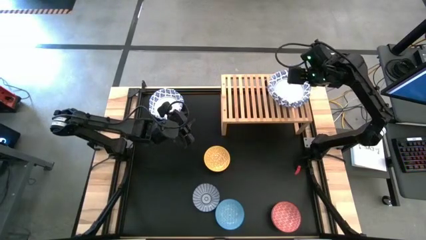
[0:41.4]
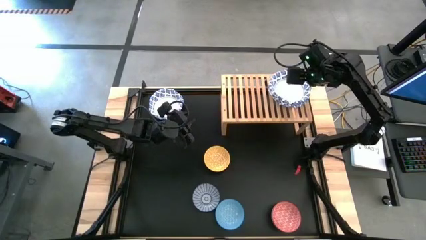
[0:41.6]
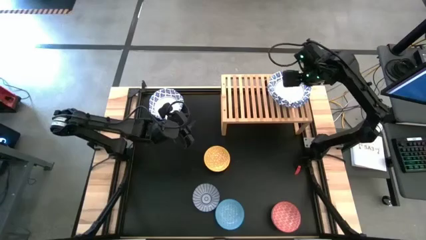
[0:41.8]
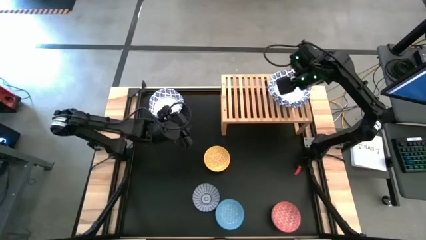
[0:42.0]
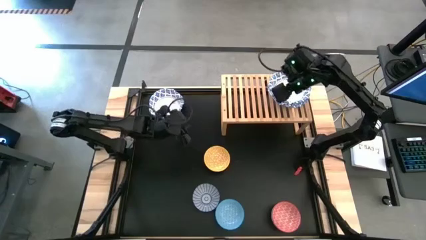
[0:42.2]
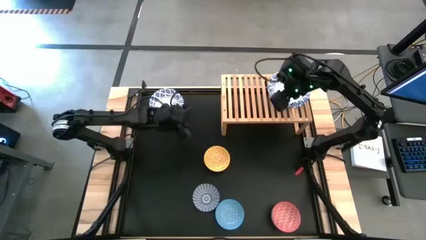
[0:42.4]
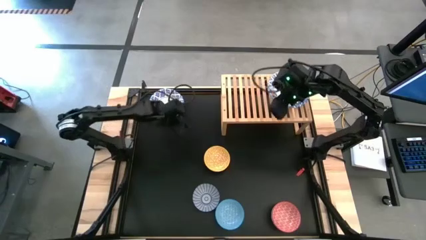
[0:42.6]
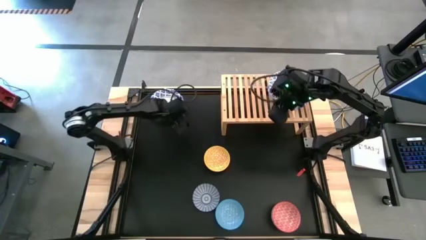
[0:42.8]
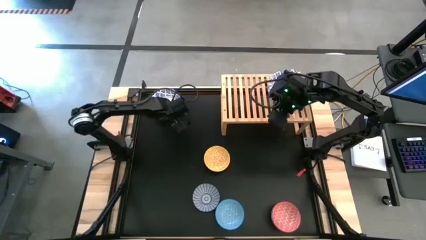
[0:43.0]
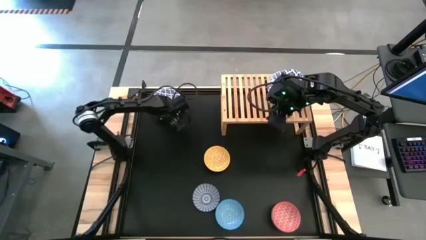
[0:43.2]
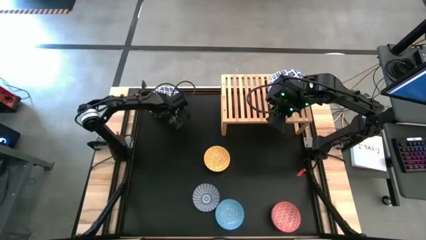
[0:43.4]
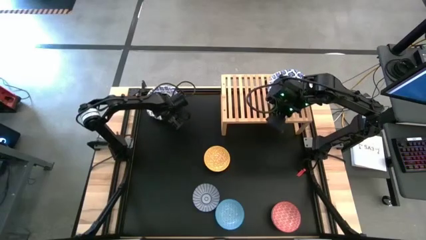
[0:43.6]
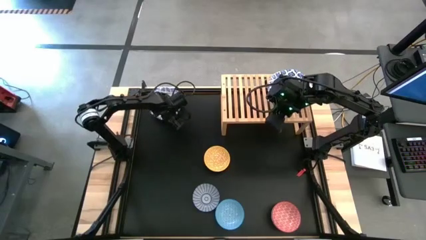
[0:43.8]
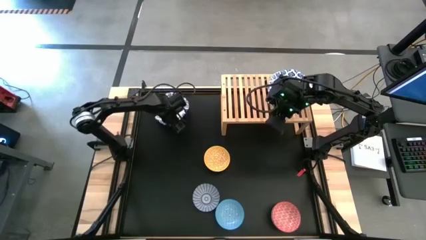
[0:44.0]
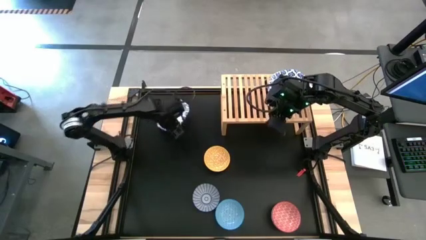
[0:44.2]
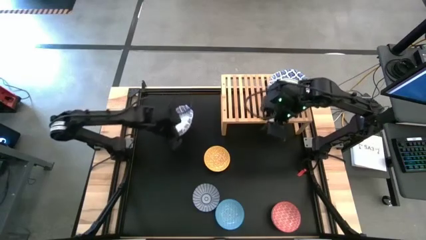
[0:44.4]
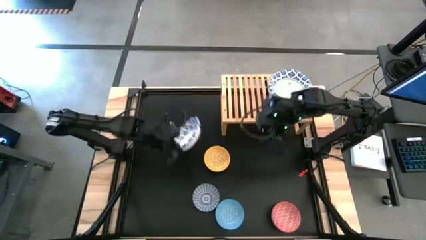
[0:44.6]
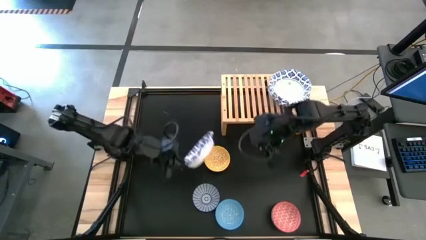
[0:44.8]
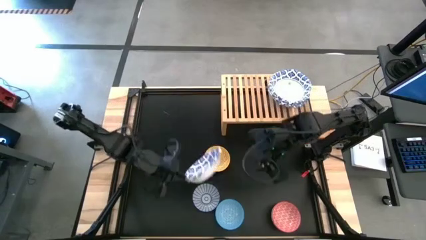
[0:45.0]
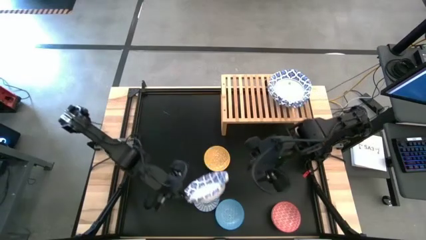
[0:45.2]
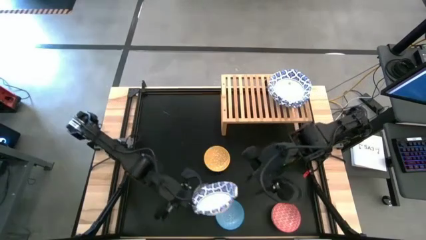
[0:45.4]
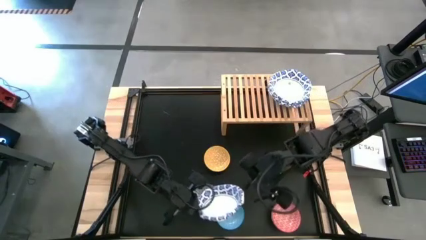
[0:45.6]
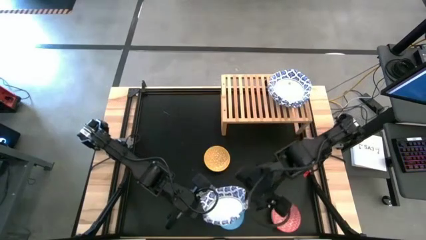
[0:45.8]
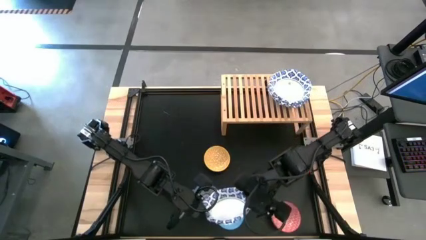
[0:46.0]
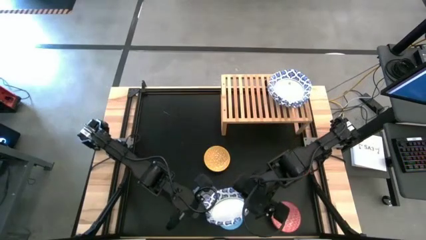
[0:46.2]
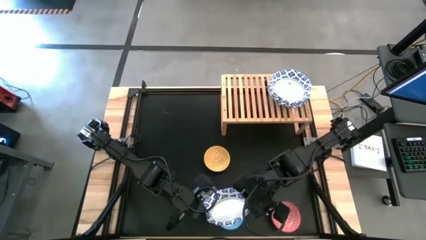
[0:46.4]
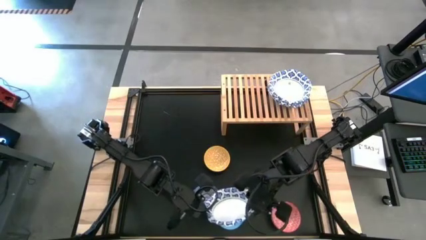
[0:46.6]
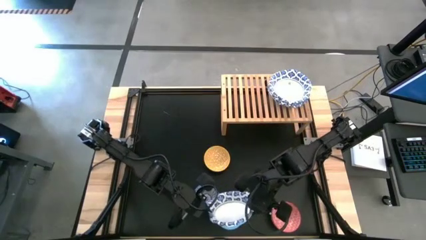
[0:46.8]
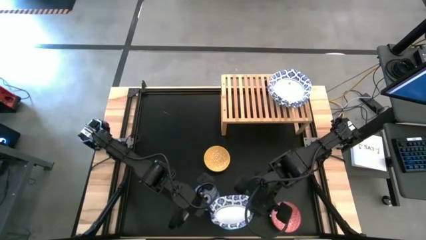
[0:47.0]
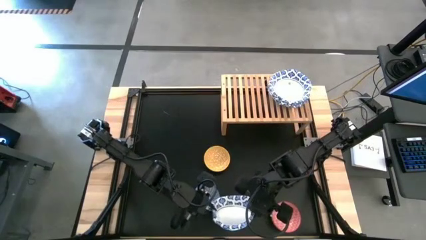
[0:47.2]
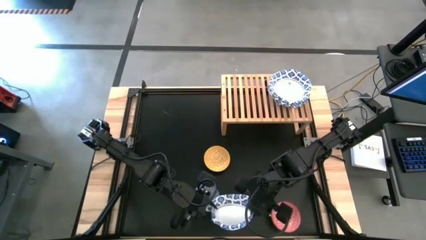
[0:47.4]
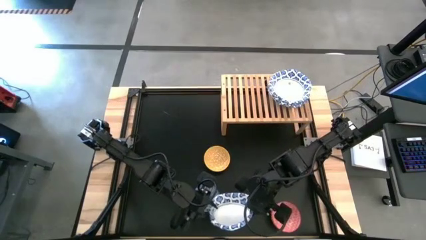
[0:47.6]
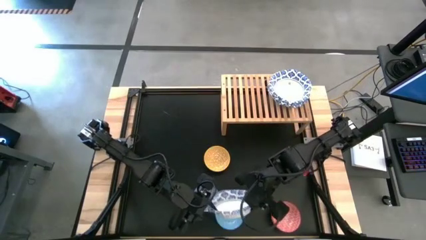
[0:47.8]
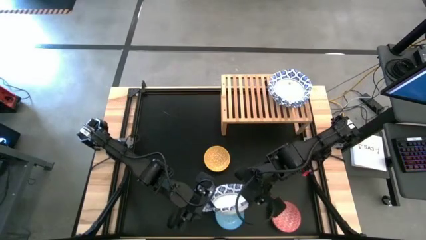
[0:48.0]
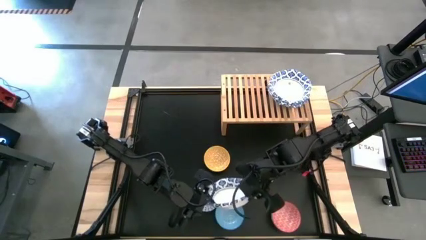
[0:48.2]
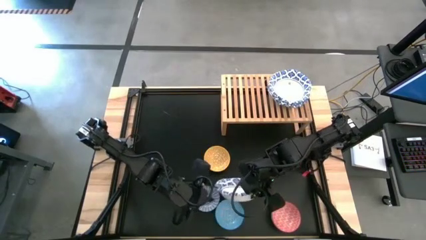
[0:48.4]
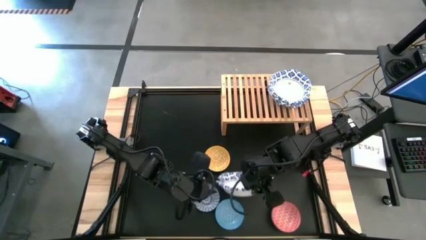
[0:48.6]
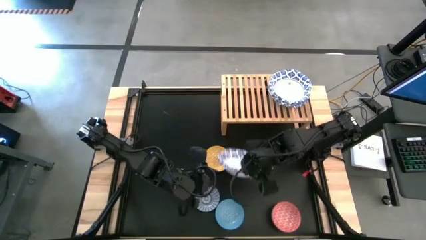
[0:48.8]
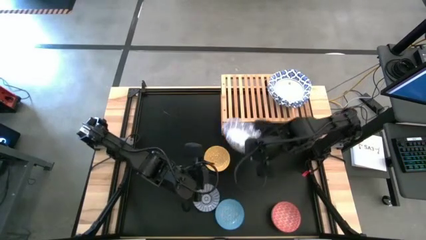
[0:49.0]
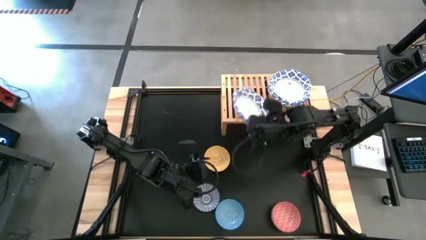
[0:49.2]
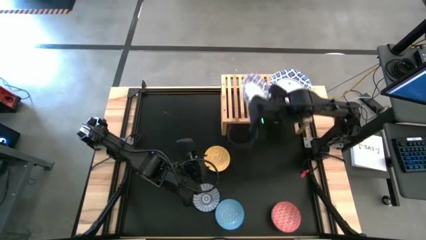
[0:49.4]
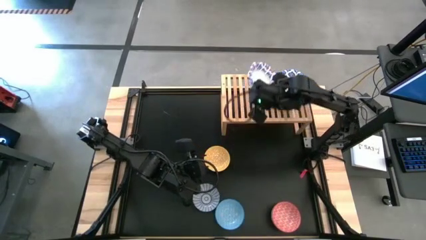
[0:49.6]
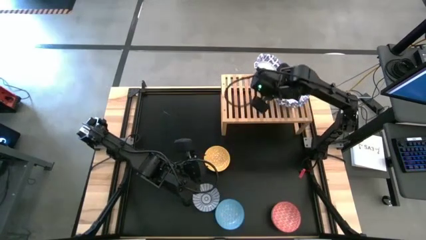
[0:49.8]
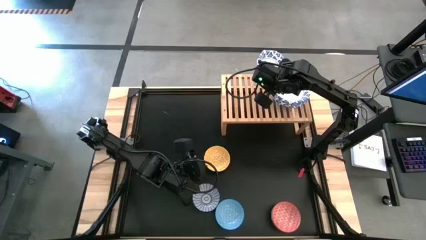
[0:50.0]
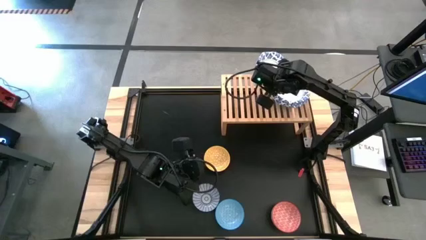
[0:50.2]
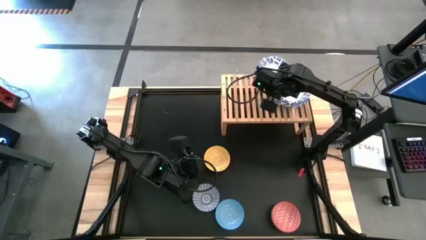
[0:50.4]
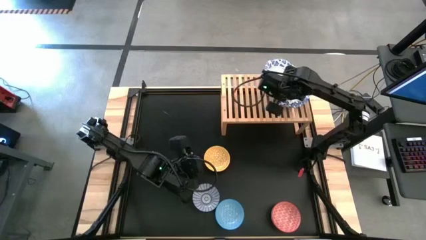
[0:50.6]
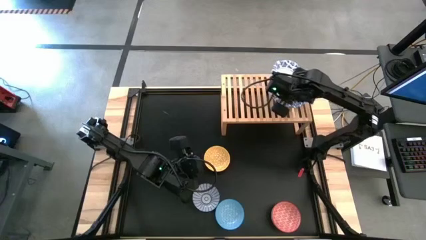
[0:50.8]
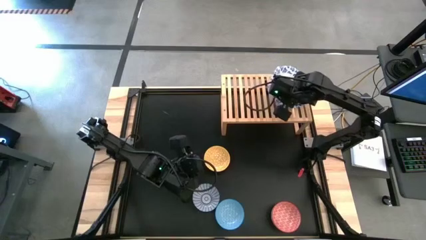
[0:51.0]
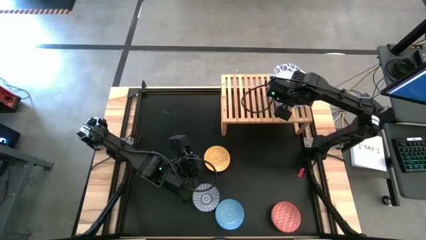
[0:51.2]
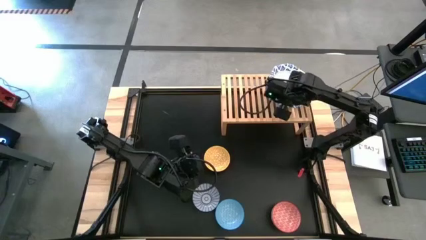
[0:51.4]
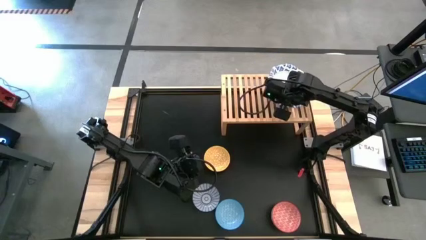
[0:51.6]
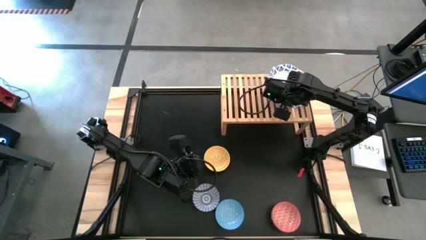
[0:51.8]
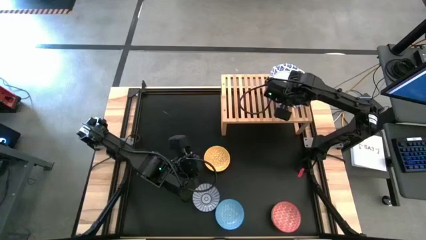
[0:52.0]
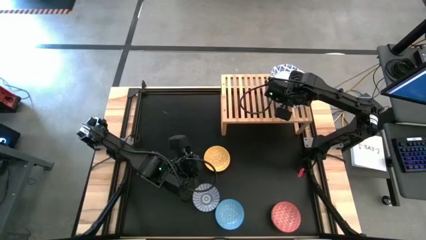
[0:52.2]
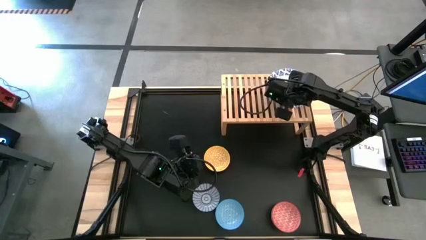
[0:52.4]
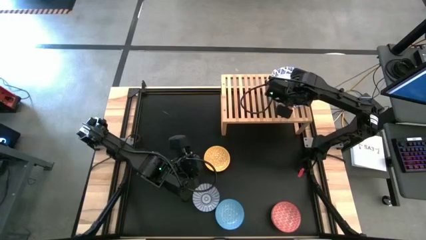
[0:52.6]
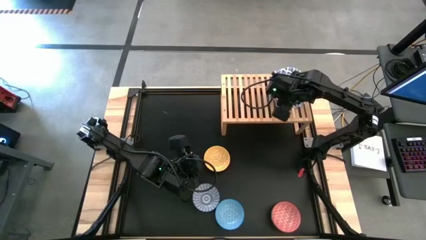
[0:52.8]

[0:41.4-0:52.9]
Task: Place and stack bowls onto a shelf
Stack the white bowl on top of the other white bowl on the shelf
